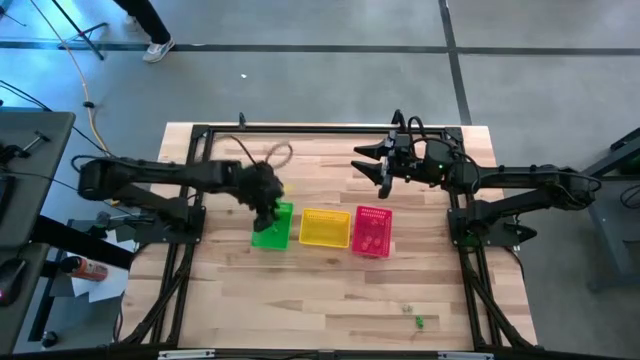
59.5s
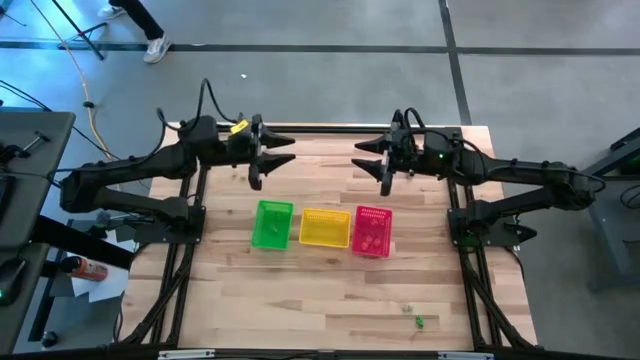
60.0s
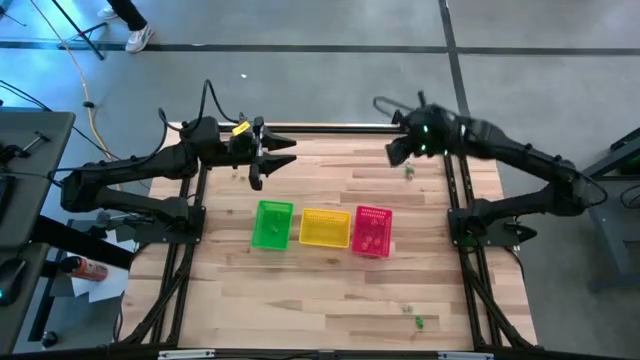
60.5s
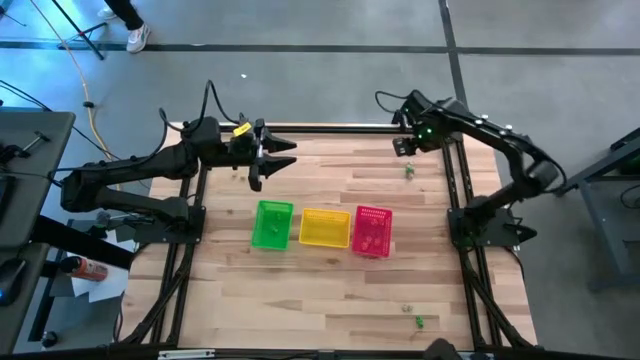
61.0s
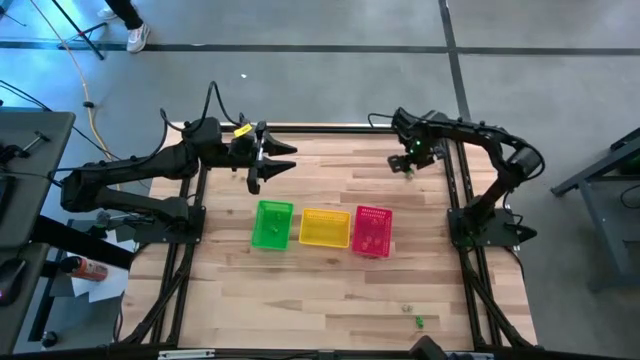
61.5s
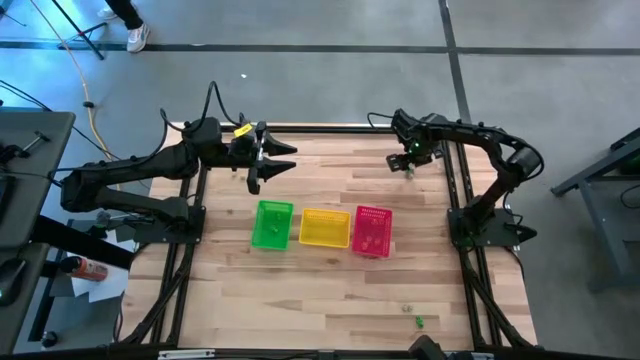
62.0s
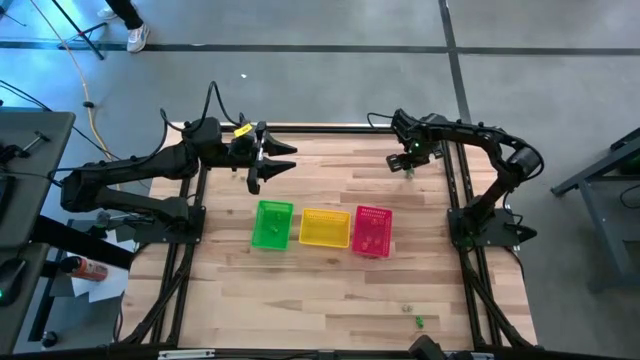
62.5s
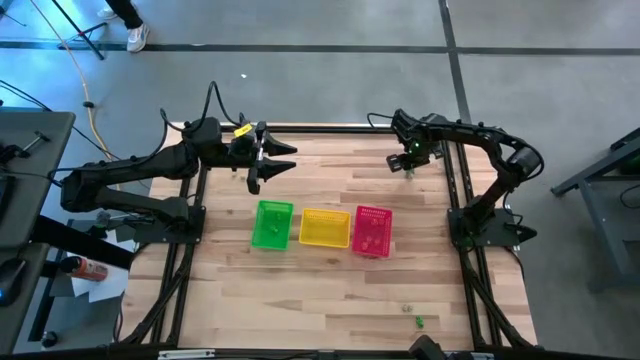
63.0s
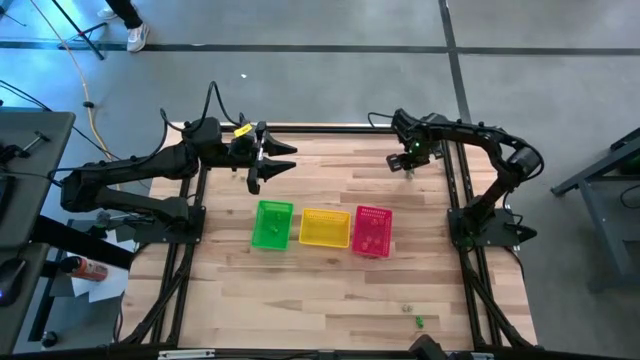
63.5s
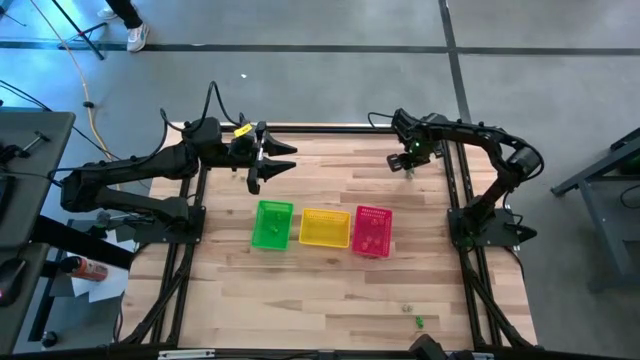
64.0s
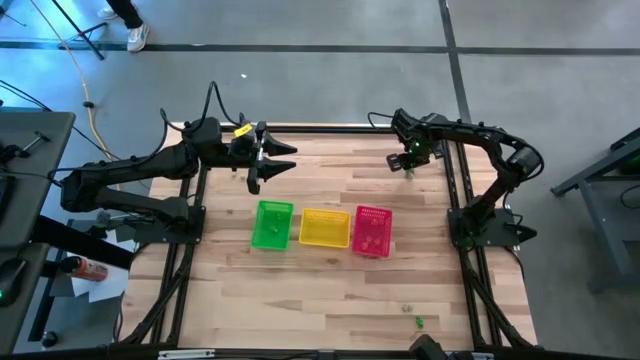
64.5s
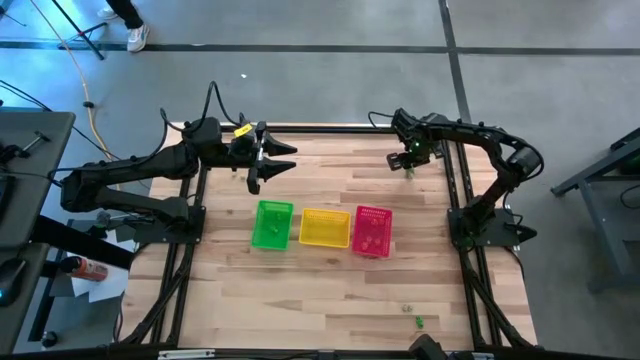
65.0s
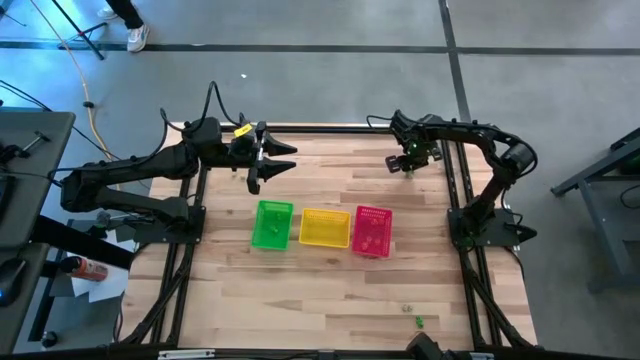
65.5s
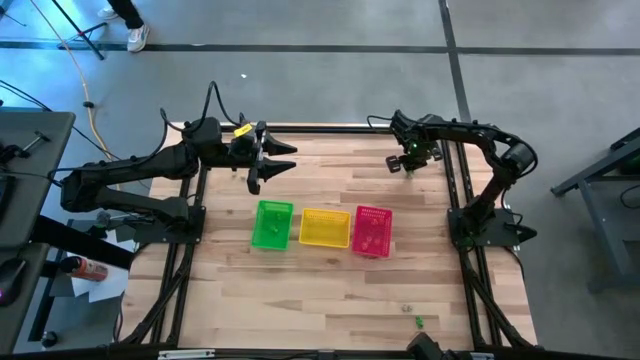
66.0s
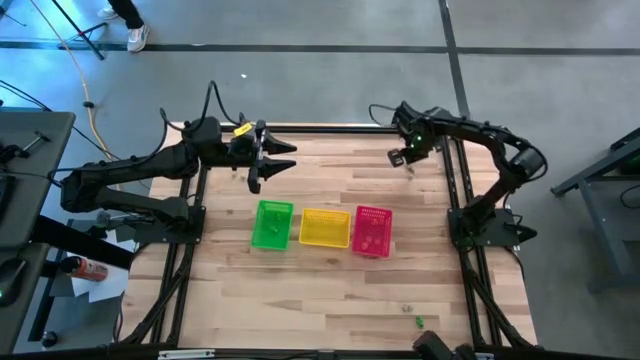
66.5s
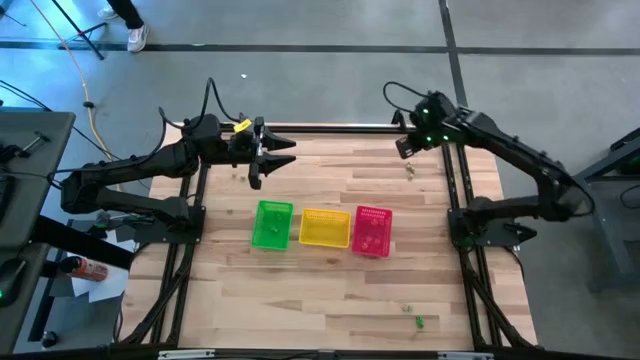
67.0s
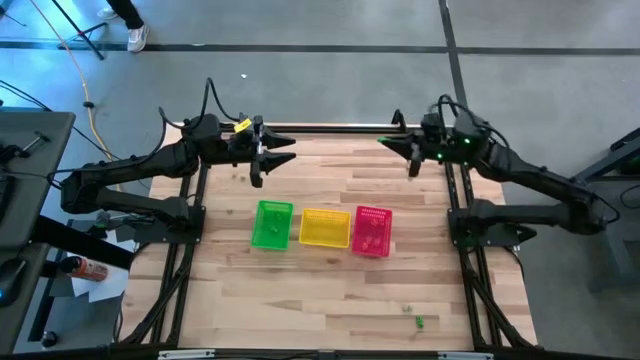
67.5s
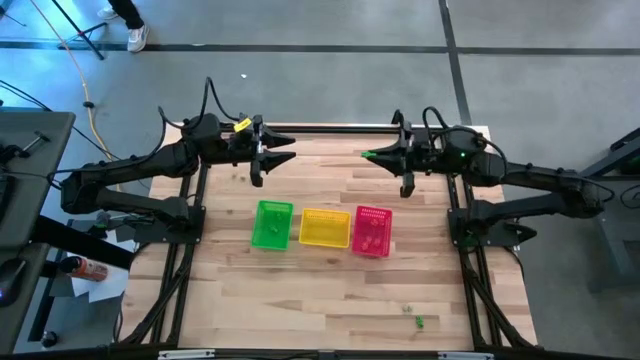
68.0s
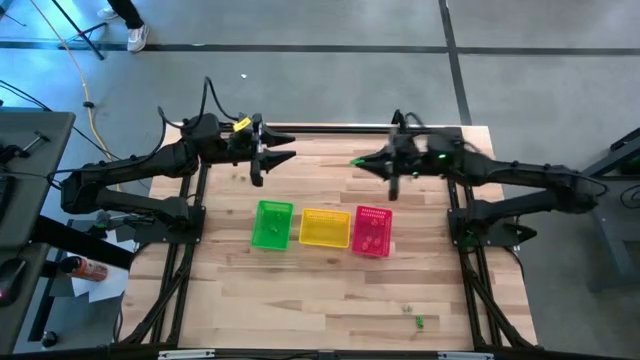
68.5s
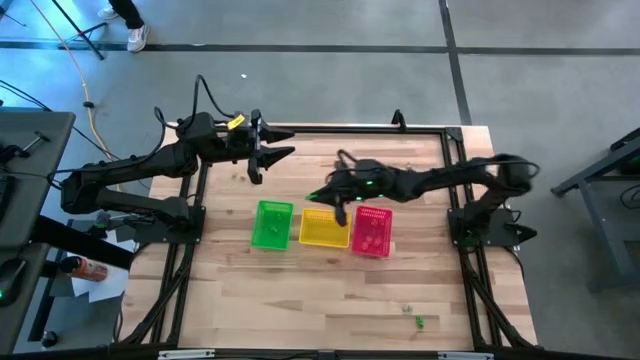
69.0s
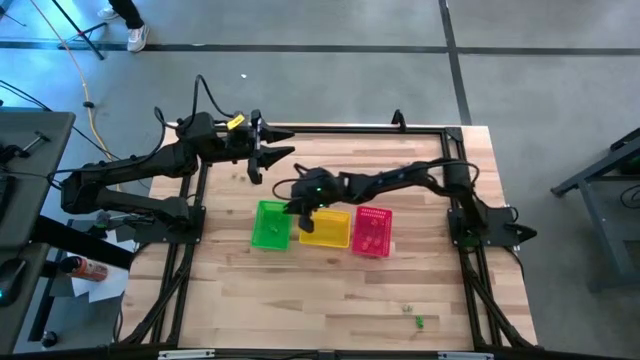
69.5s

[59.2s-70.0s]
Task: Sort Halloween decoration
Put the green skeleton toy into the green basket

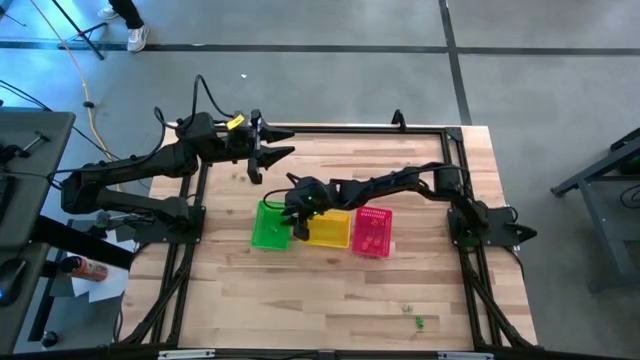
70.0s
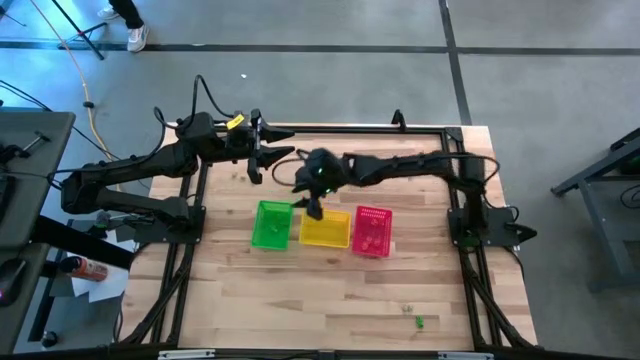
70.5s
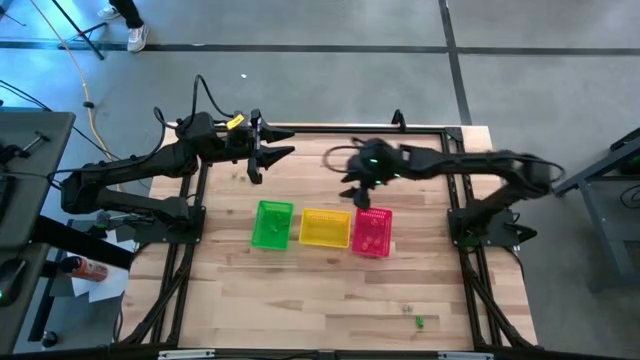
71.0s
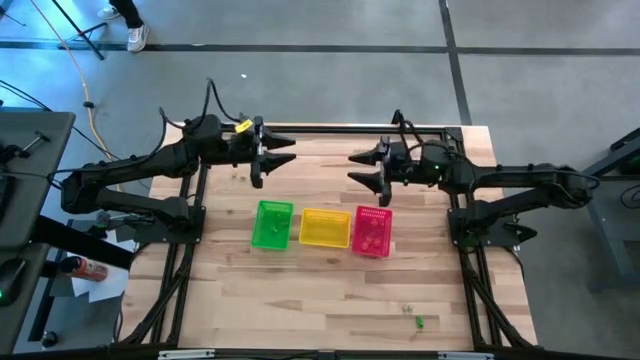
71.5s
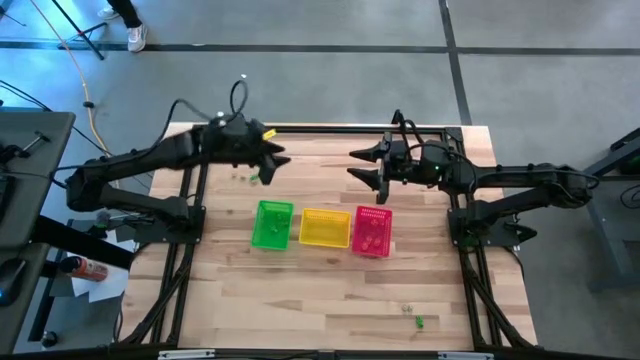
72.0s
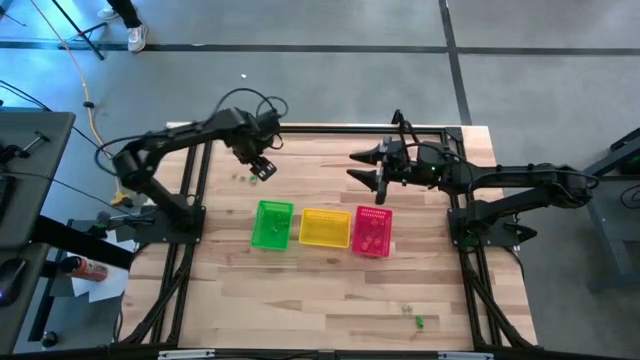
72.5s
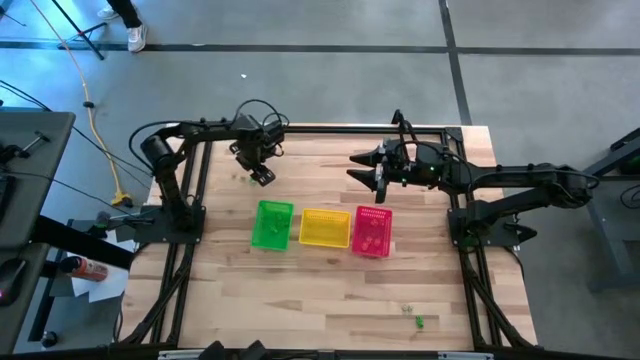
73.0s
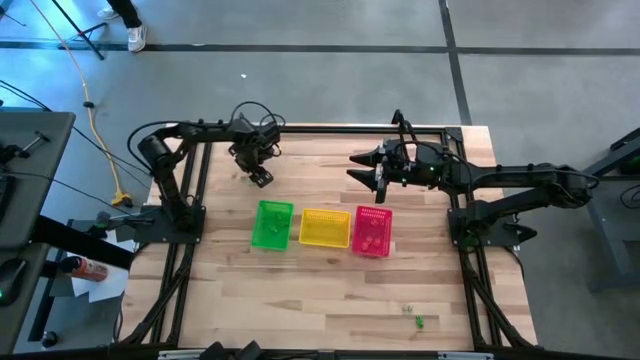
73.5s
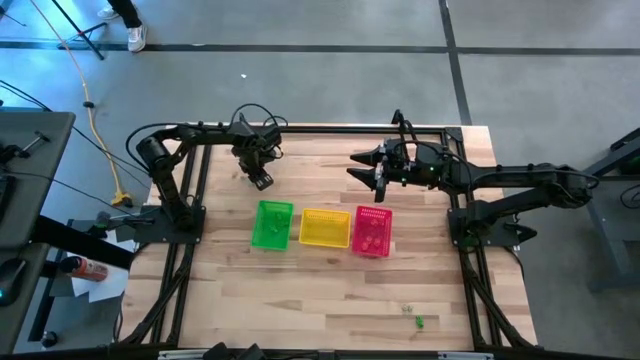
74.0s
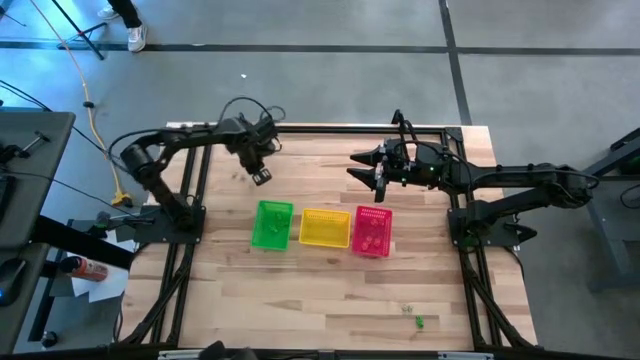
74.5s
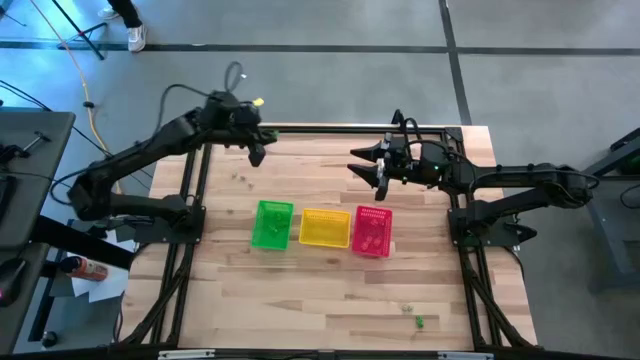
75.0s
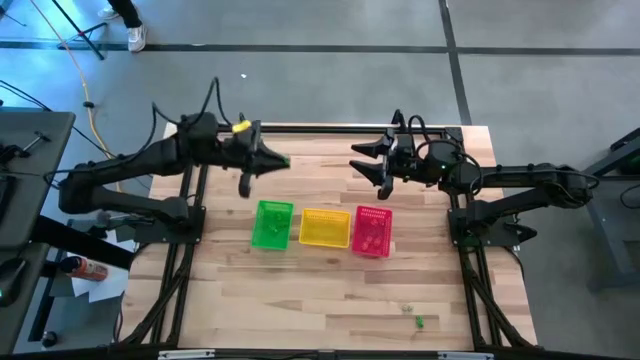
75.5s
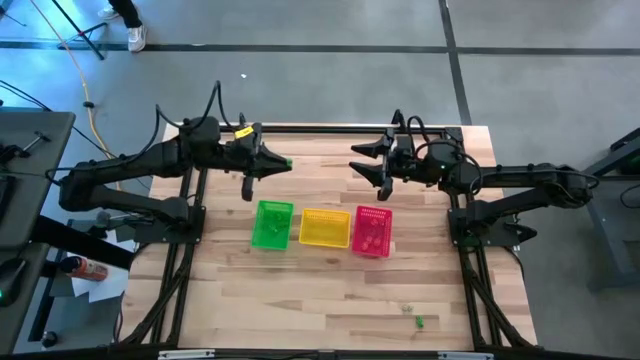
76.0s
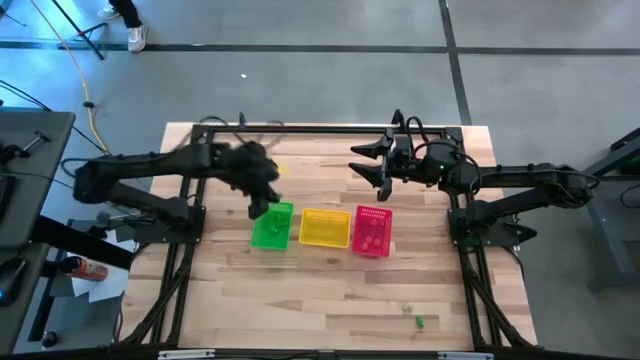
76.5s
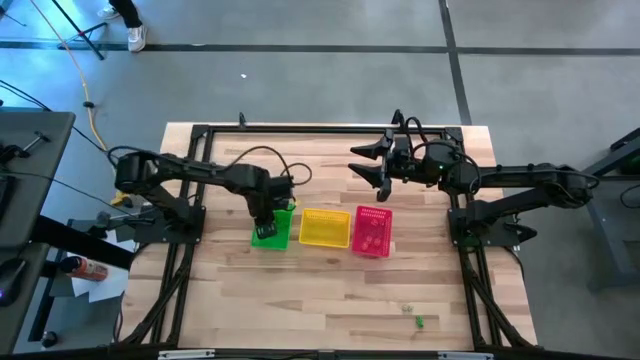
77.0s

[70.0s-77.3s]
Put the green skeleton toy into the green basket

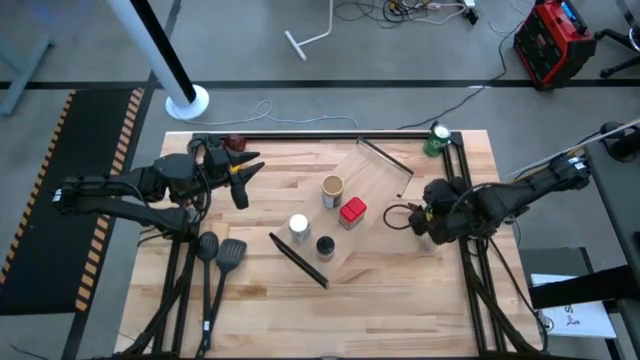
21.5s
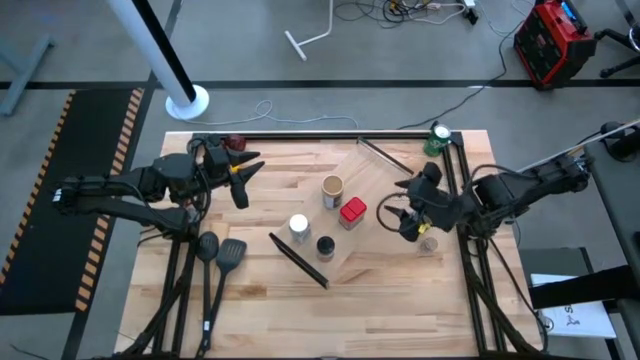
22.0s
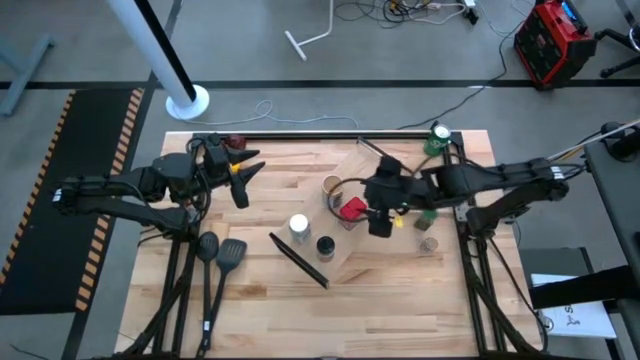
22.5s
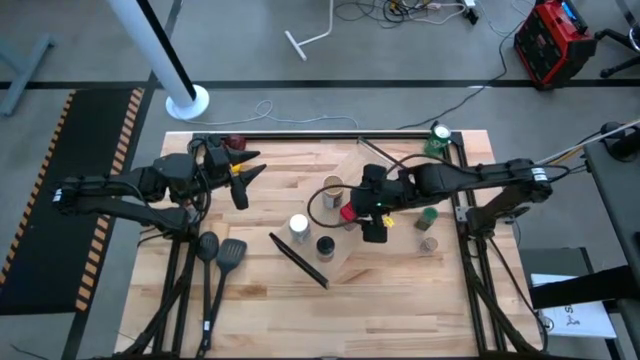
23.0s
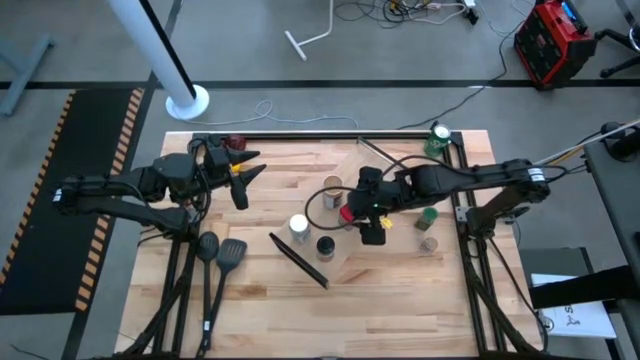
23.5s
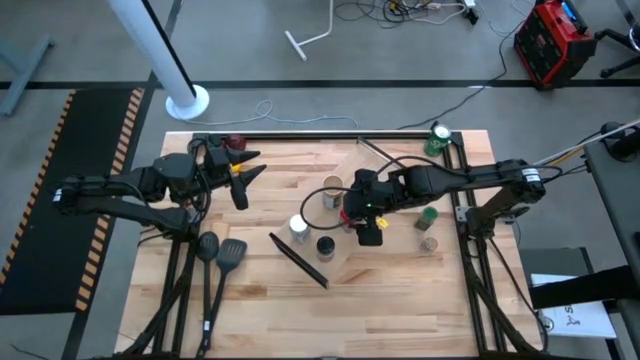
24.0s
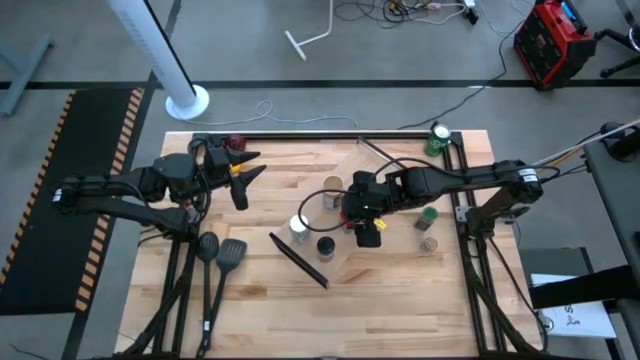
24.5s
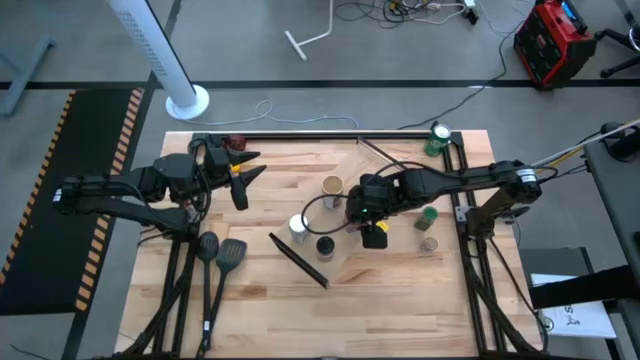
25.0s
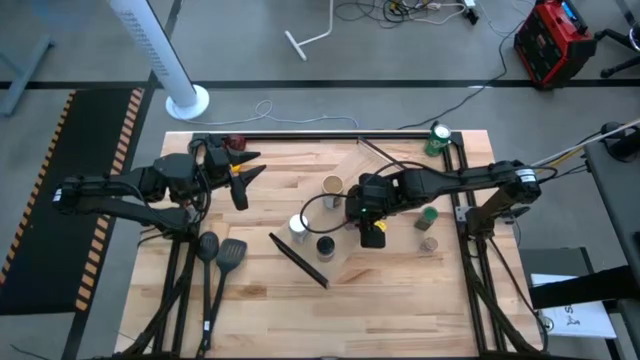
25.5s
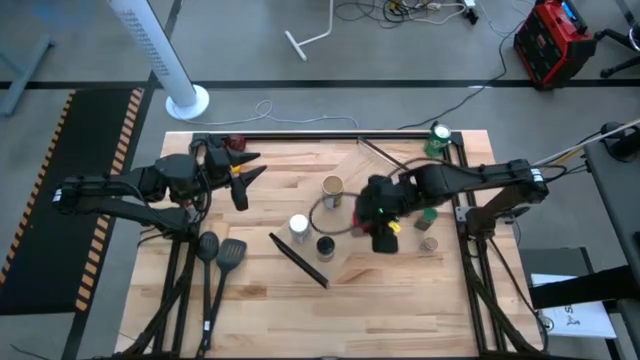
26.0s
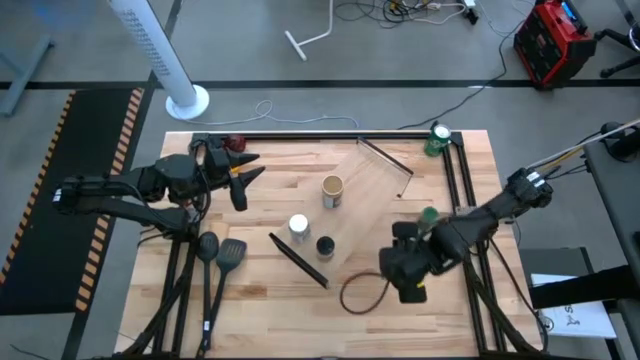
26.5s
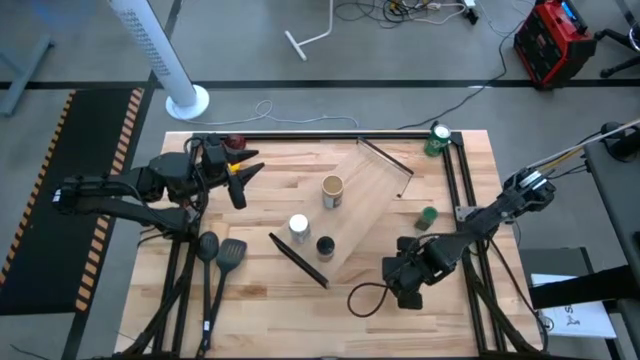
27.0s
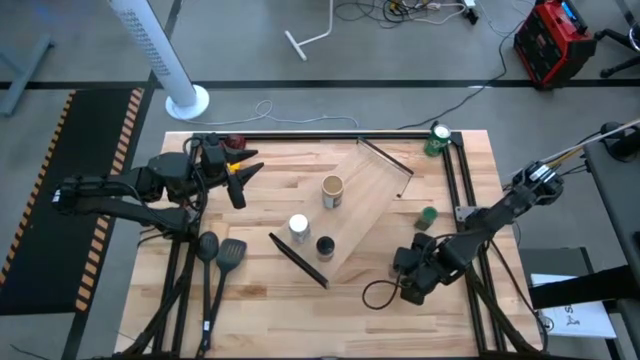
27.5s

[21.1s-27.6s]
Task: Shelf spices
Remove the red seasoning can from the shelf
